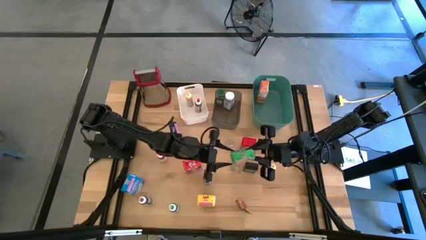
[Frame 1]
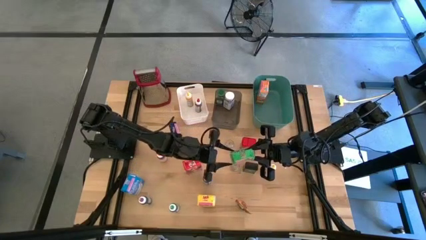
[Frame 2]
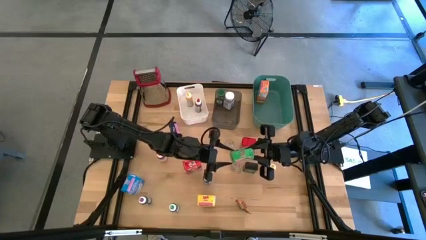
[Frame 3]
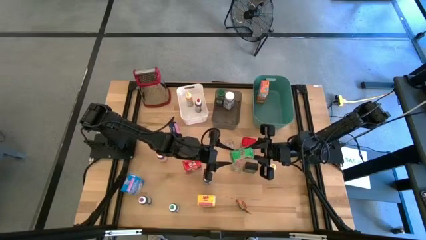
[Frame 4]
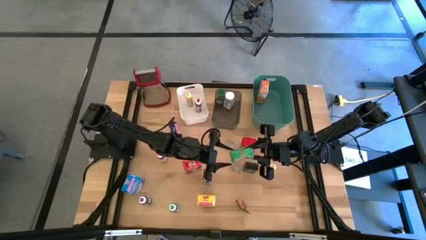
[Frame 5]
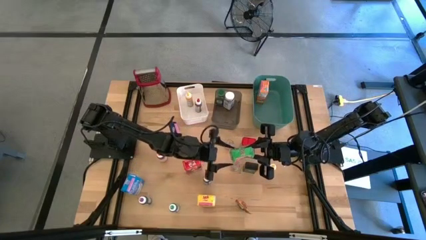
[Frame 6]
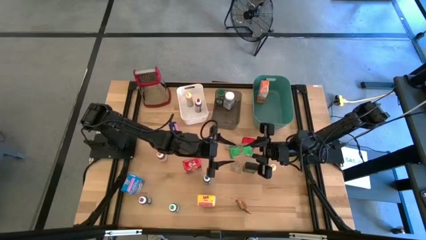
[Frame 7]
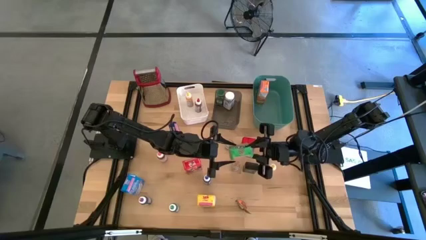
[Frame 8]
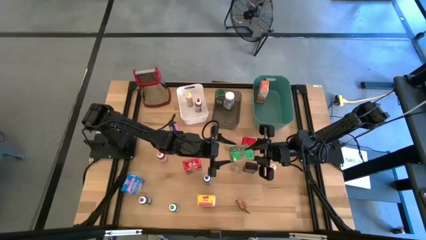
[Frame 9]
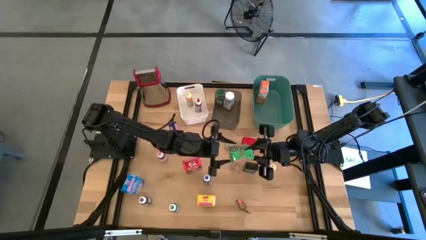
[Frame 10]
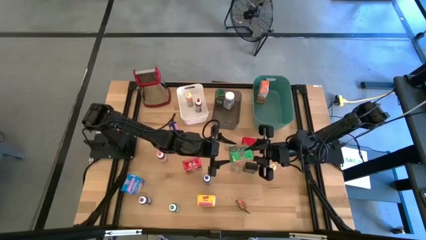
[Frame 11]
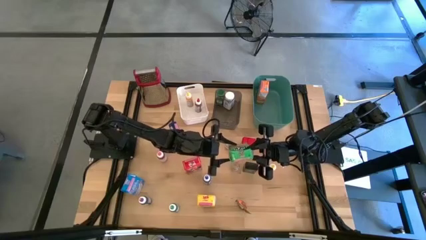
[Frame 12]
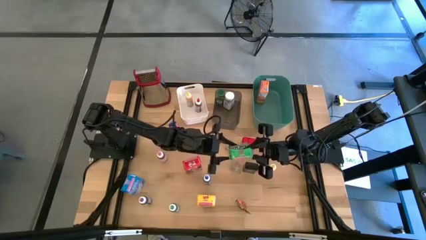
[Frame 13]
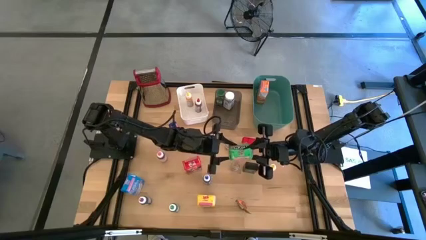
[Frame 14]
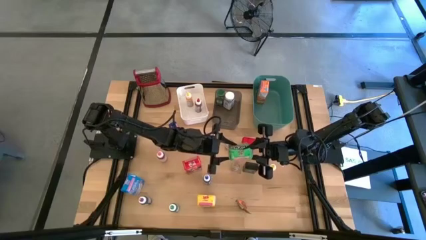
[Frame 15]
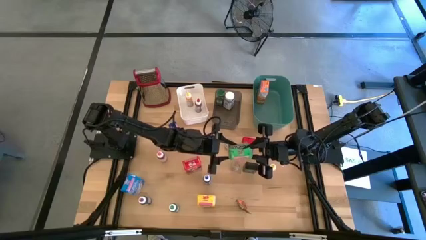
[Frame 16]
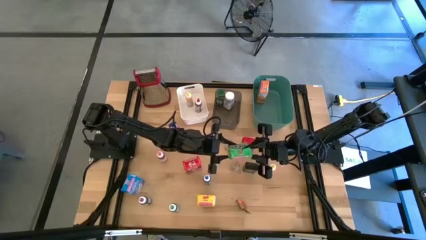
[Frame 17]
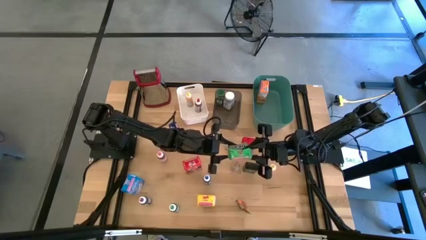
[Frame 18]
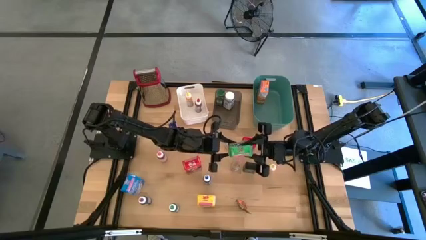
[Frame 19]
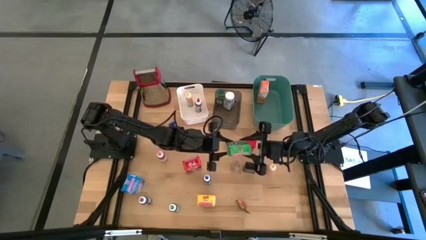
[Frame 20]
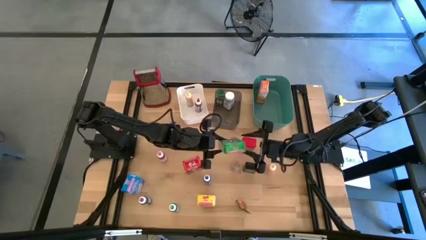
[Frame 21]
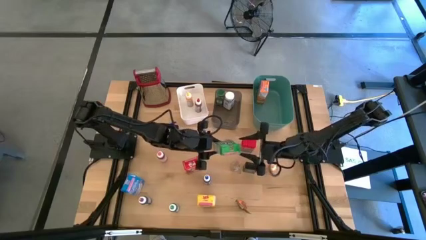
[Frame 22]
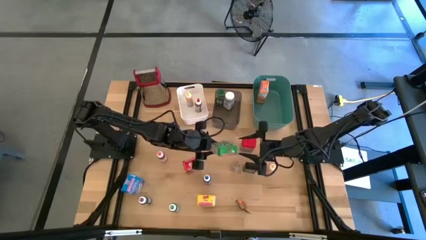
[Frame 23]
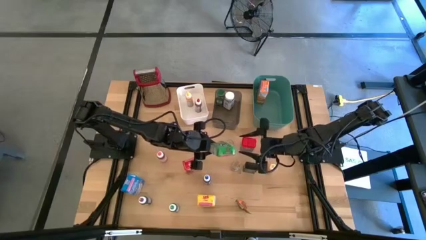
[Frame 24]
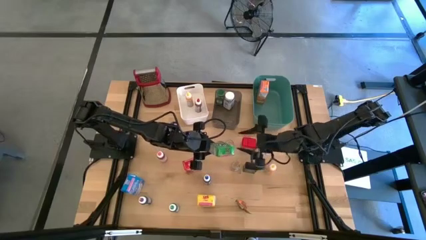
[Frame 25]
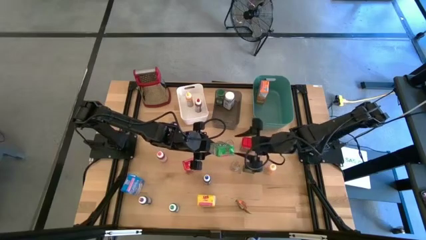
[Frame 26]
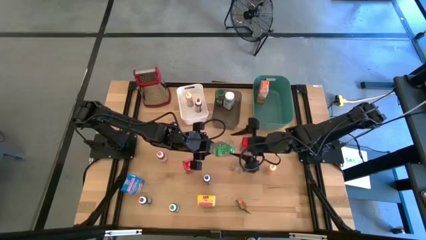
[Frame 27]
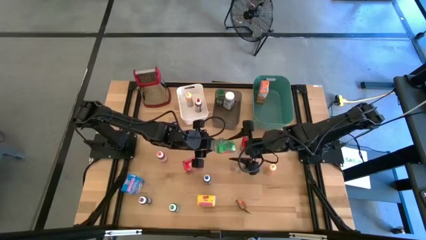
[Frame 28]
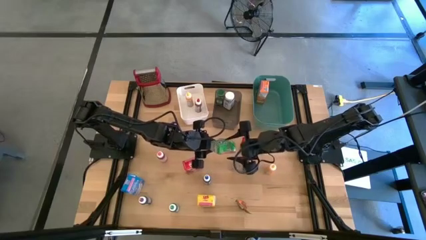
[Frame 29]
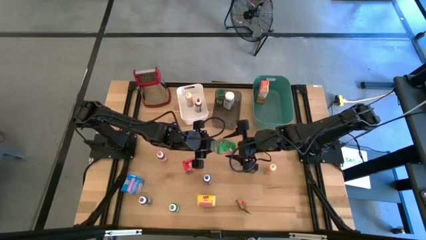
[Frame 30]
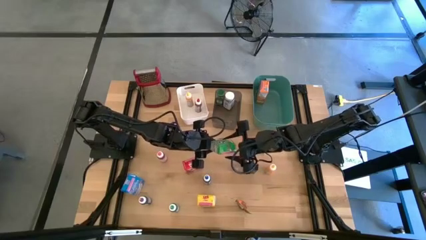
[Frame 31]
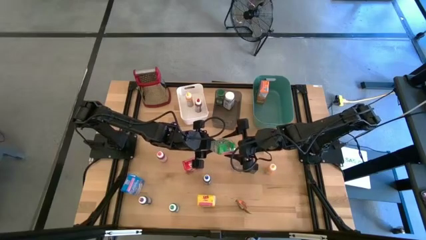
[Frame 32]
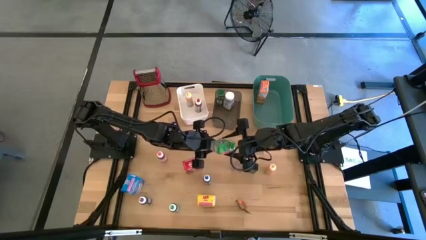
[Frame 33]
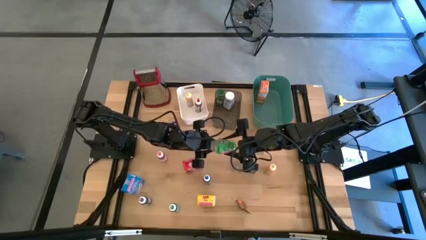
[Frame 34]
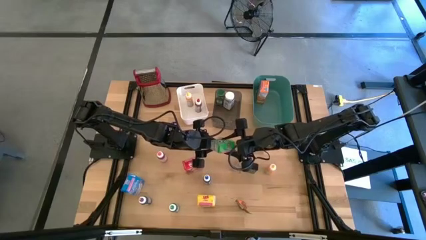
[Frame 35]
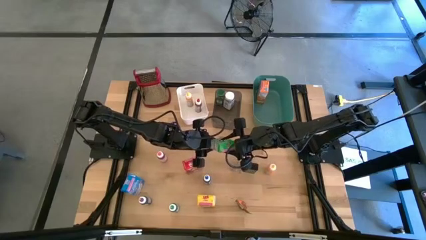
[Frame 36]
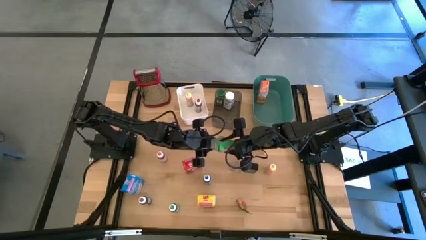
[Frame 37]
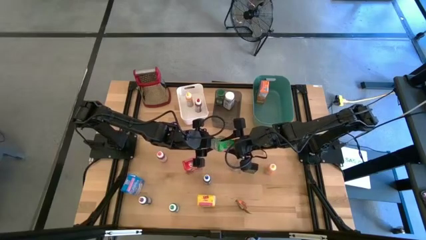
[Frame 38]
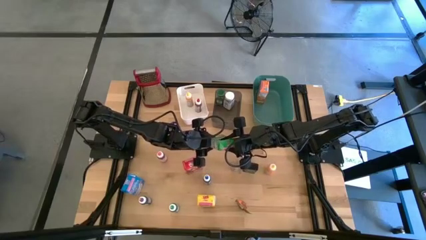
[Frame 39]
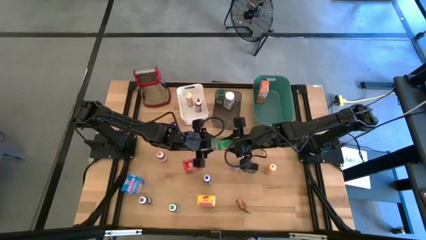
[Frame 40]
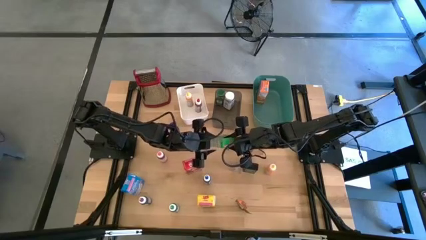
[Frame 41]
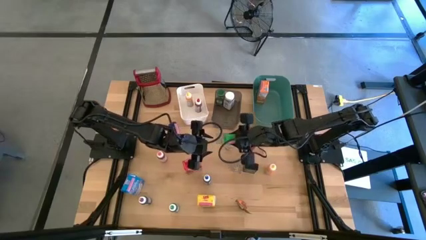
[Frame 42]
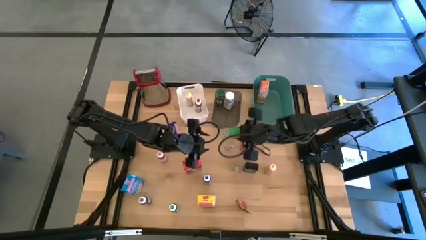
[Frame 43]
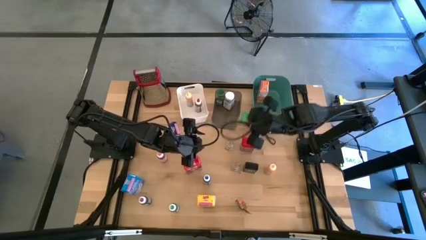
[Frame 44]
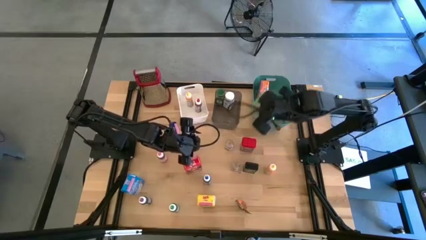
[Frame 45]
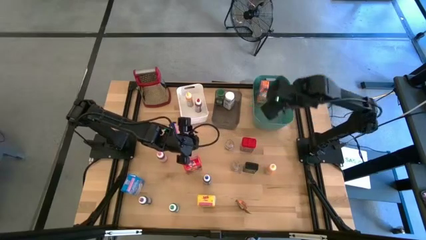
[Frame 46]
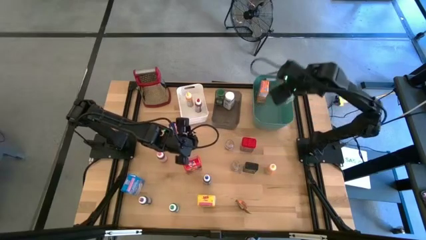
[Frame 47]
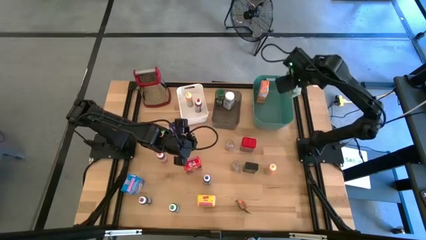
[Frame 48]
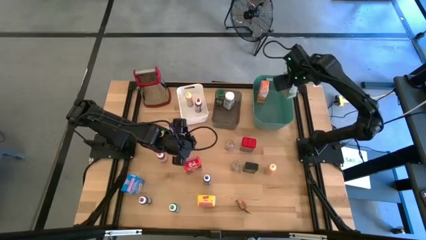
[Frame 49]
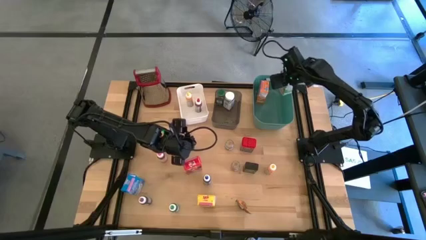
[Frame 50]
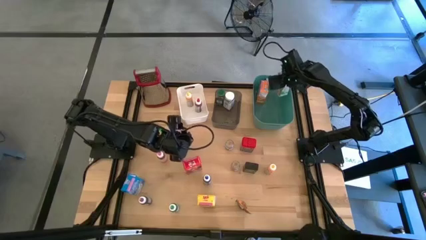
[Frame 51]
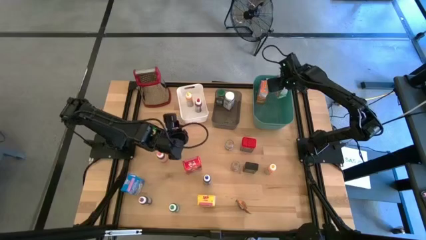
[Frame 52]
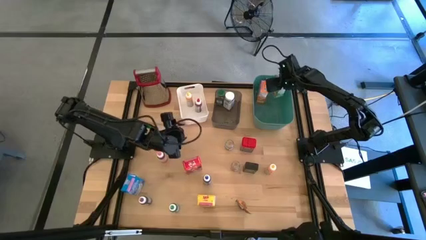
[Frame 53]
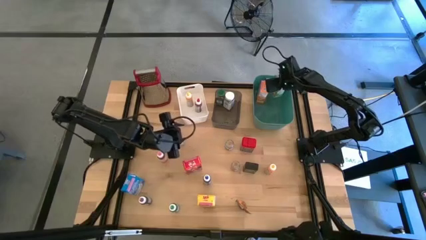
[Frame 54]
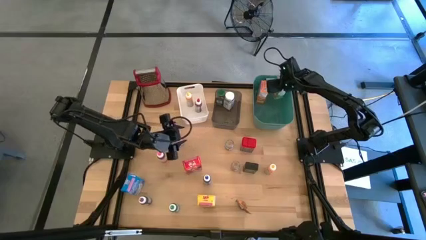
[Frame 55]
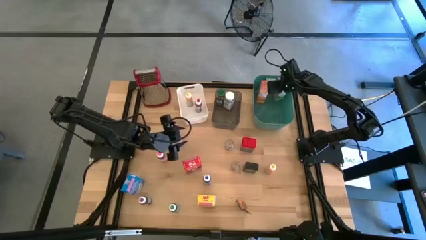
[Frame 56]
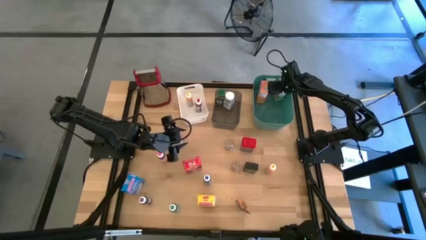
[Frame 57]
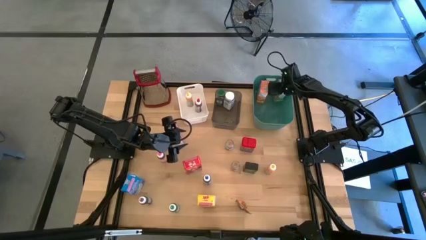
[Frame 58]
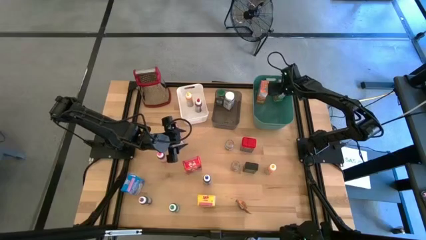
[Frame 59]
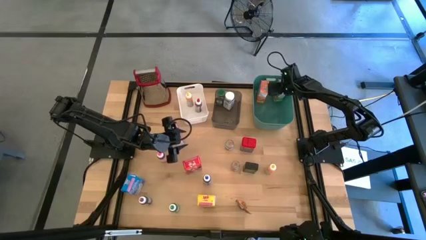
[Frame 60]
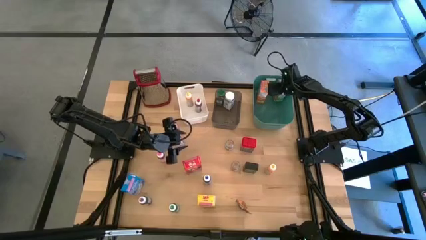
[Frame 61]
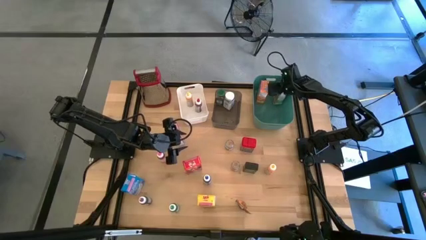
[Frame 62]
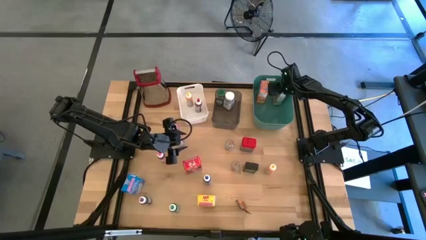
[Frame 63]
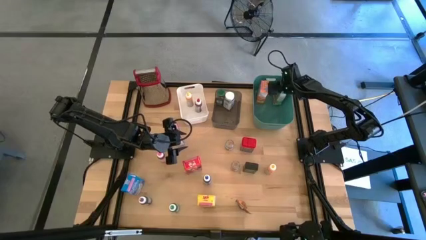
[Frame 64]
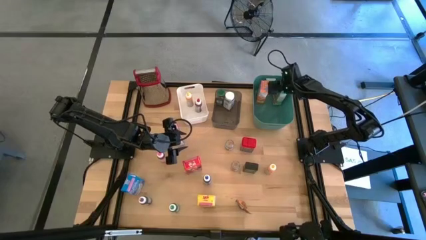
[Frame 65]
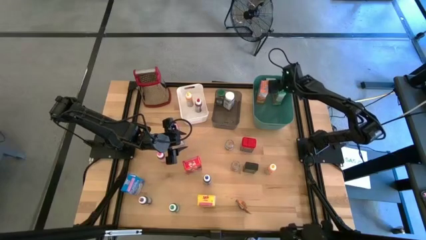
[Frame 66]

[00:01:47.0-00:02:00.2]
Task: Pick & Place Kitchen Items
Put the green cereal box into the green bin

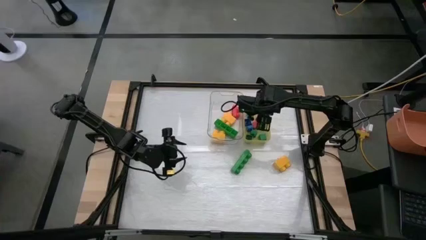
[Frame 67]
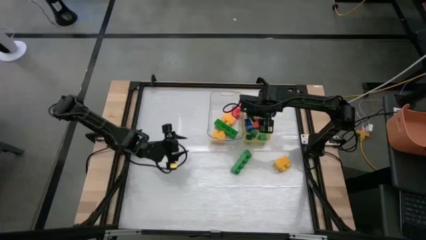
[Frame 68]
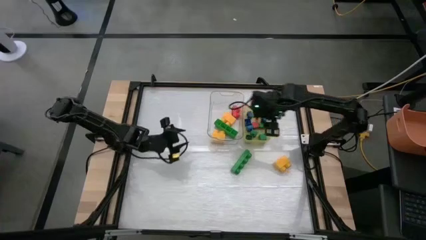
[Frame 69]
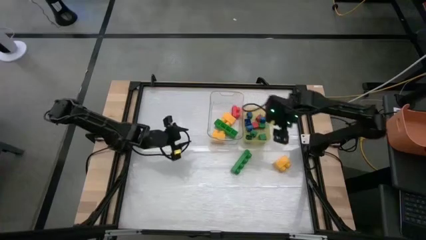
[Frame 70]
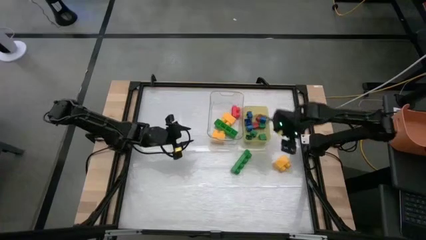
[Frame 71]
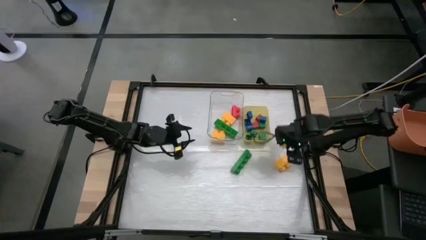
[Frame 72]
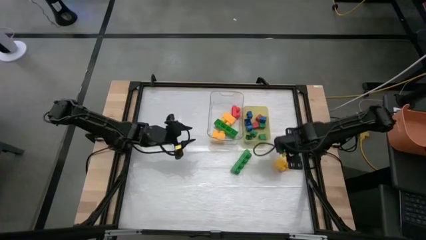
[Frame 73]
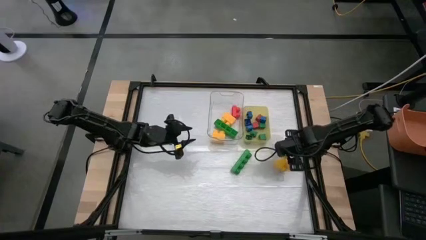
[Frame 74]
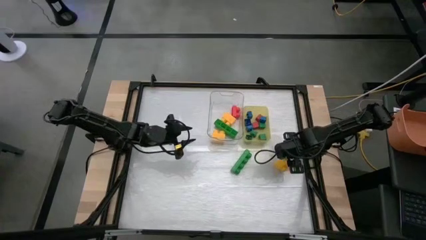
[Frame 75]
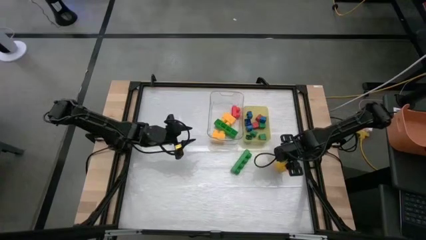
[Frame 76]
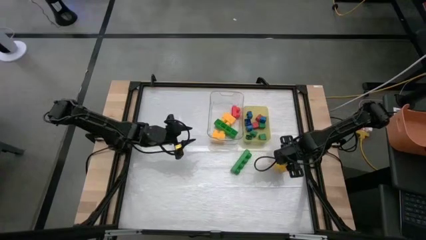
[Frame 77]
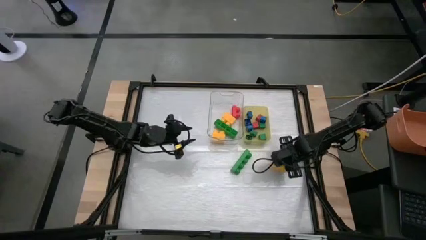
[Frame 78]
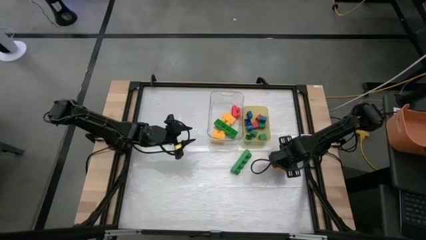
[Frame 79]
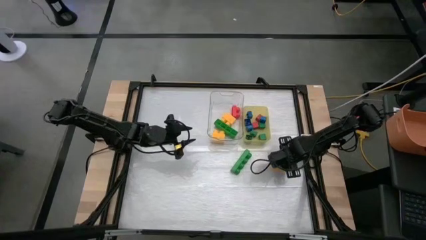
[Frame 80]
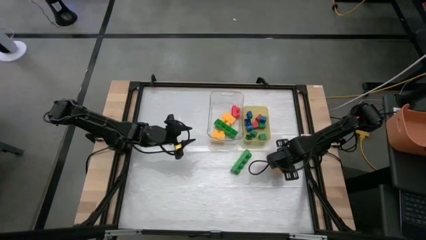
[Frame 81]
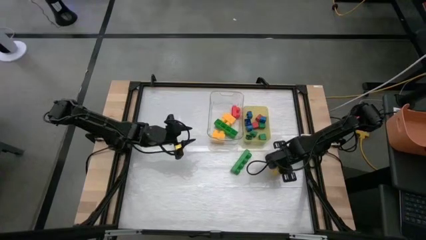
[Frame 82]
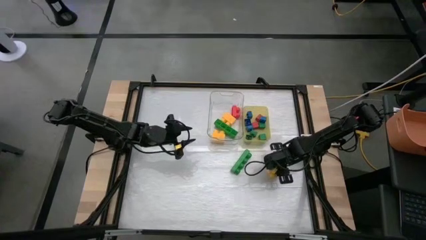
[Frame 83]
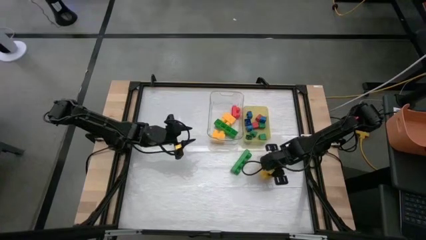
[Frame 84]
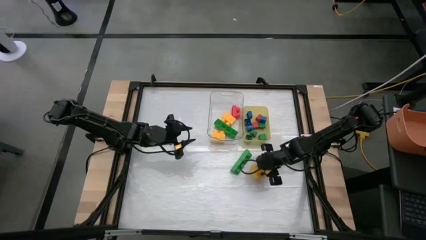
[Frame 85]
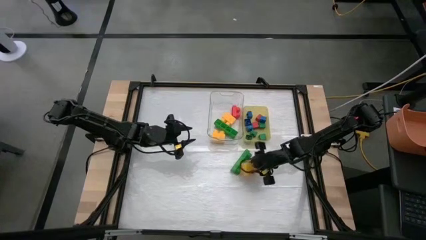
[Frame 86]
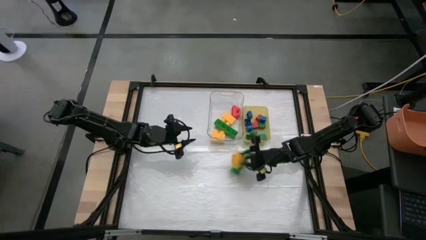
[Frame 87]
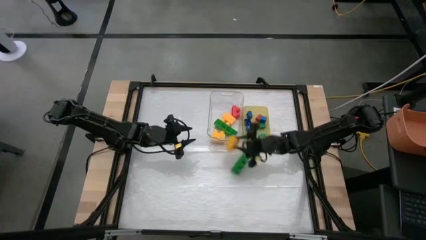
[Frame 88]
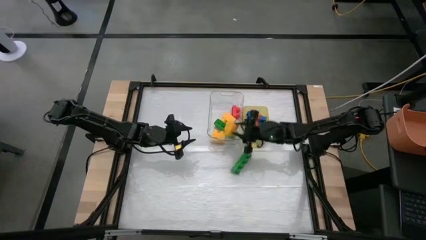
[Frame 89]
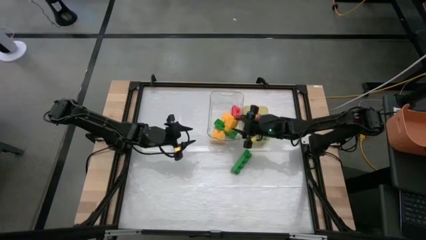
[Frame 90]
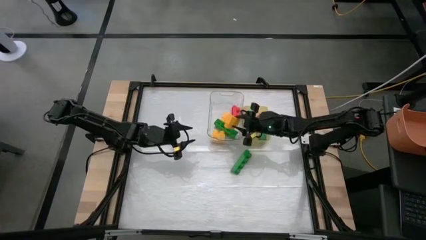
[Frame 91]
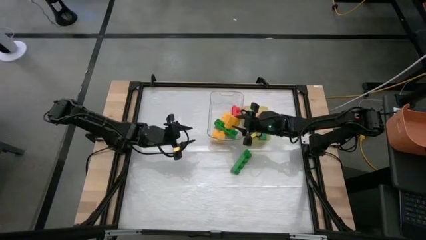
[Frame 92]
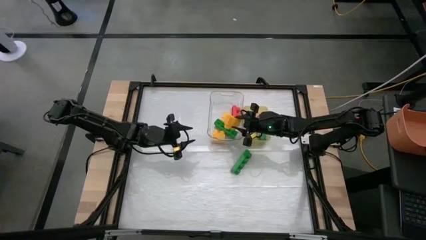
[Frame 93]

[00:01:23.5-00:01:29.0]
Task: Sort blocks by size
Put the large yellow game piece into the transparent bin
